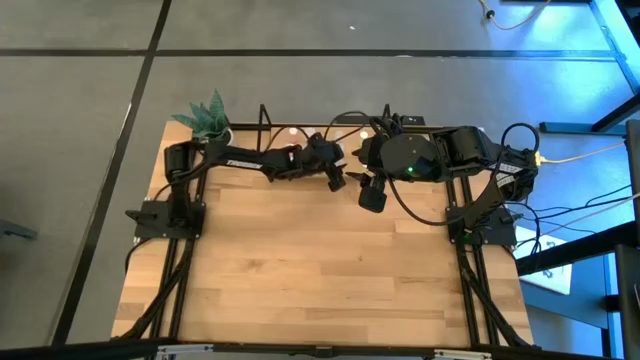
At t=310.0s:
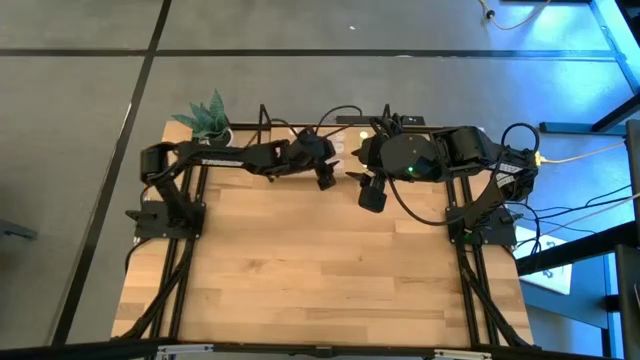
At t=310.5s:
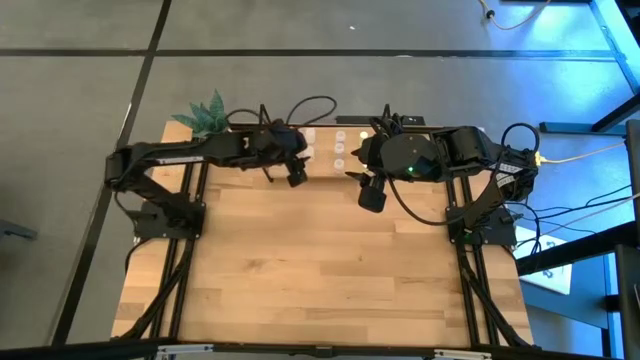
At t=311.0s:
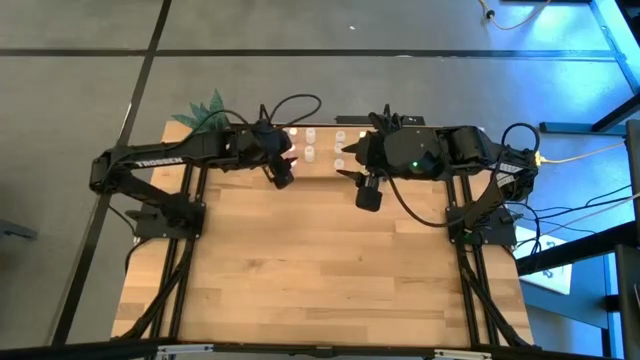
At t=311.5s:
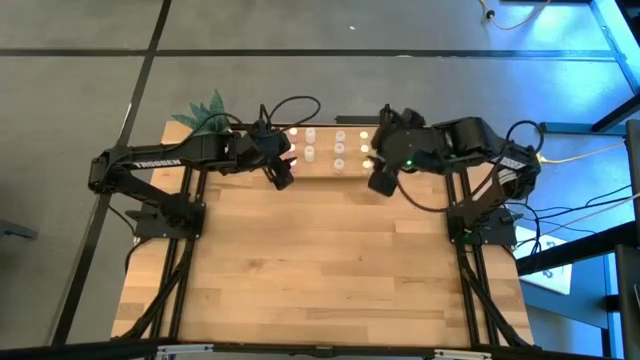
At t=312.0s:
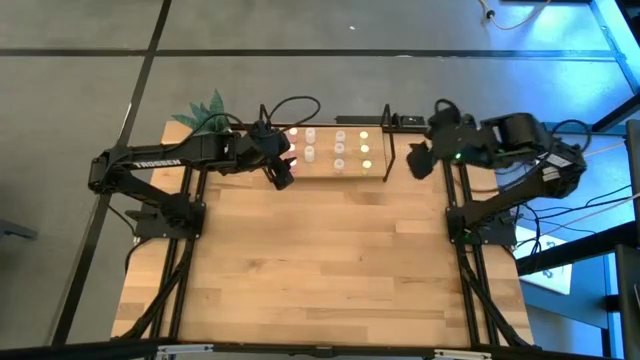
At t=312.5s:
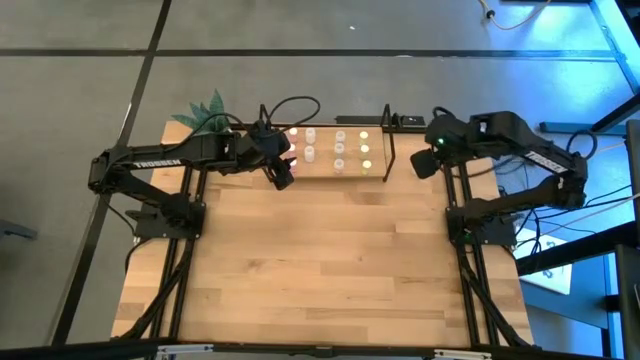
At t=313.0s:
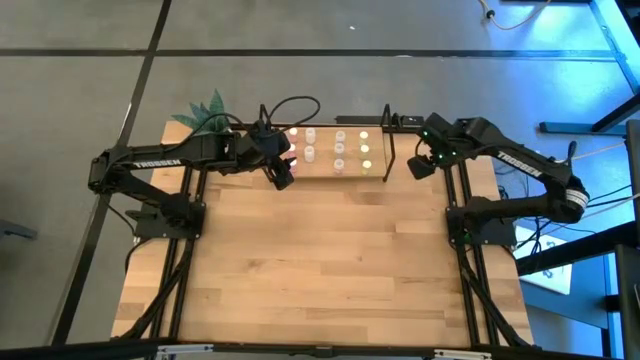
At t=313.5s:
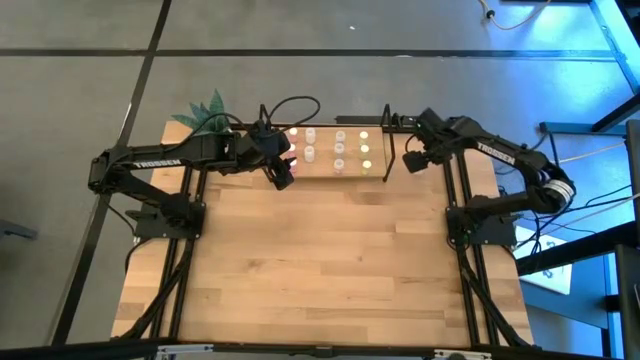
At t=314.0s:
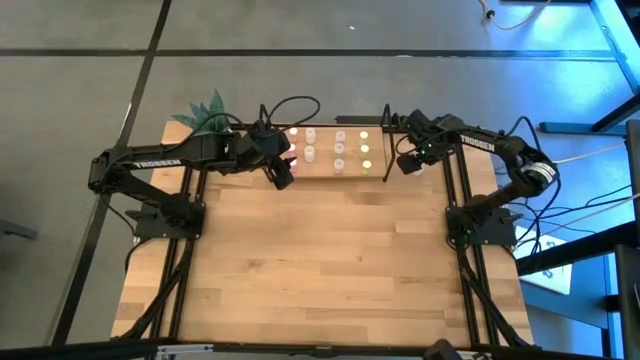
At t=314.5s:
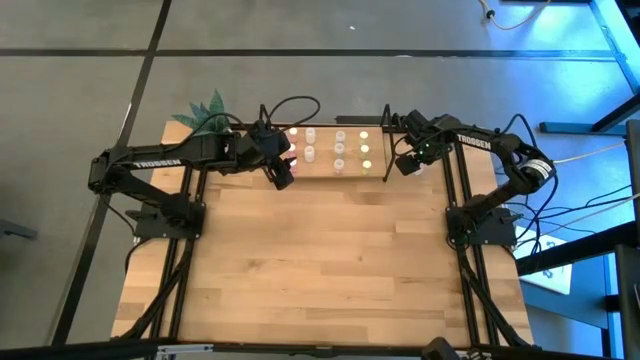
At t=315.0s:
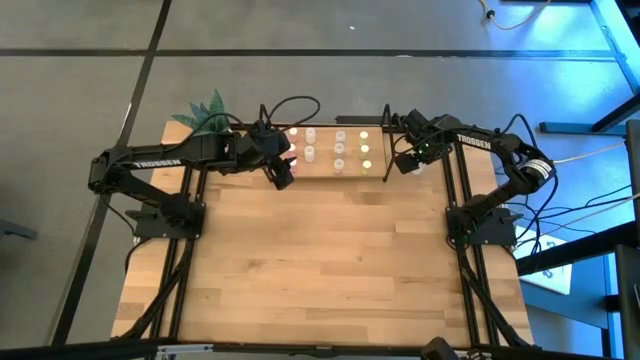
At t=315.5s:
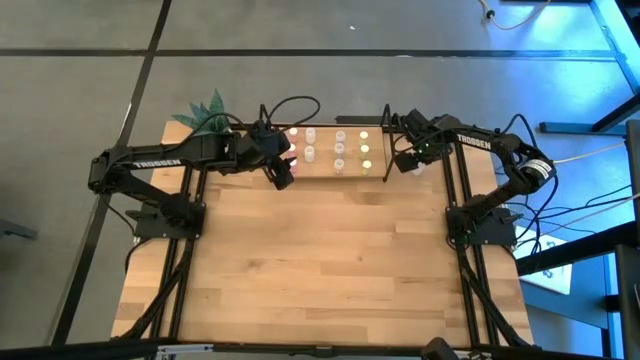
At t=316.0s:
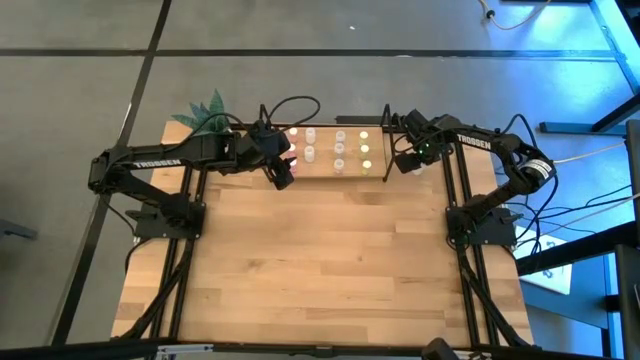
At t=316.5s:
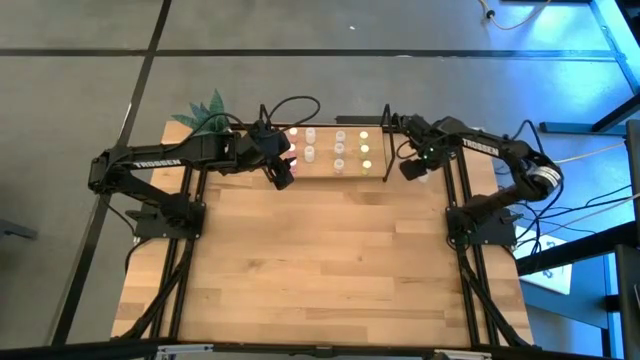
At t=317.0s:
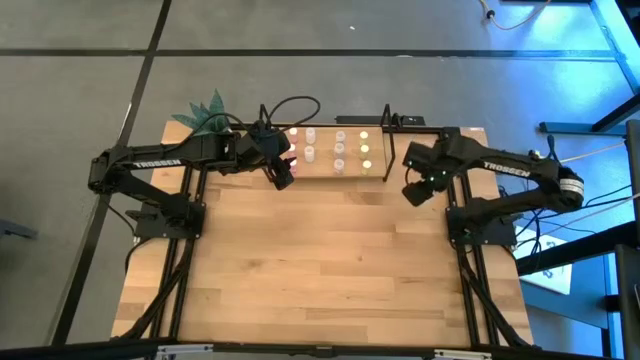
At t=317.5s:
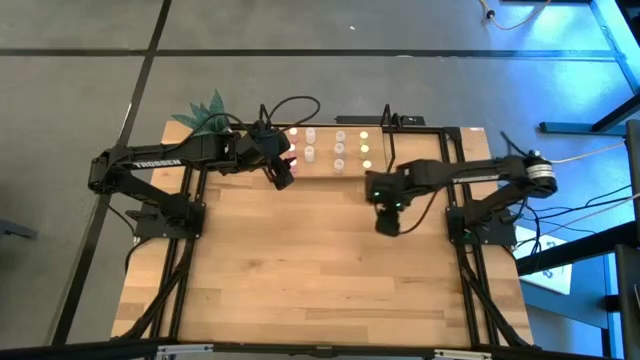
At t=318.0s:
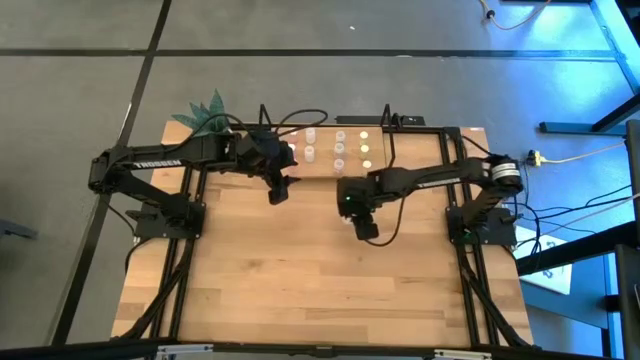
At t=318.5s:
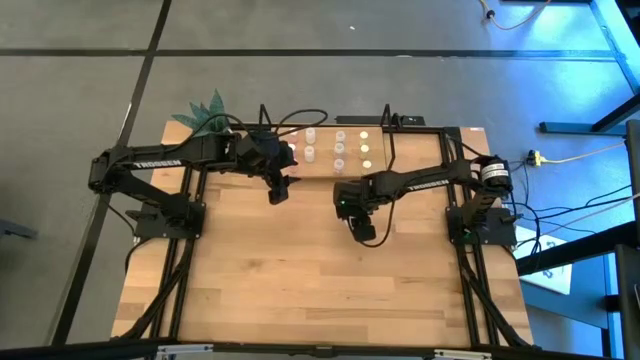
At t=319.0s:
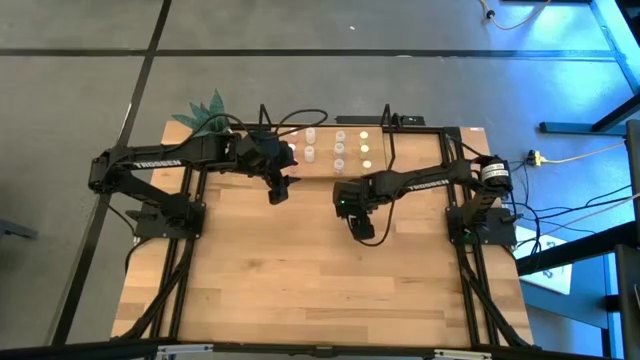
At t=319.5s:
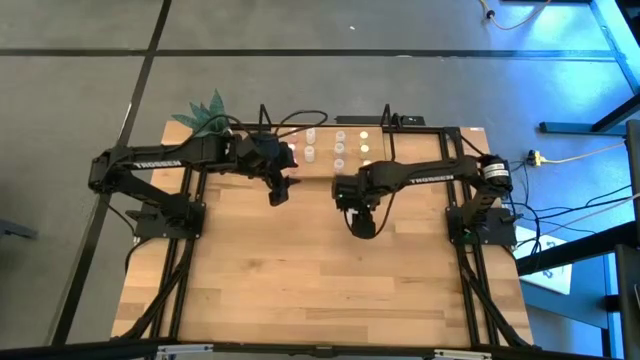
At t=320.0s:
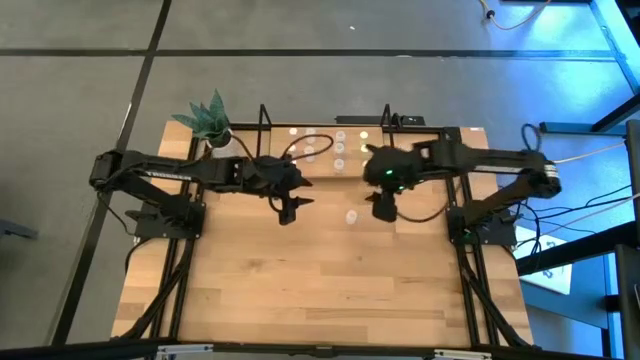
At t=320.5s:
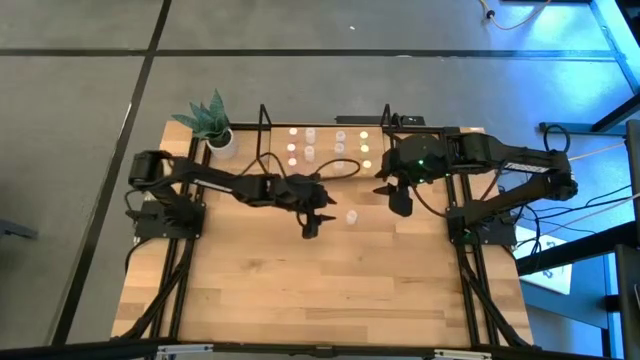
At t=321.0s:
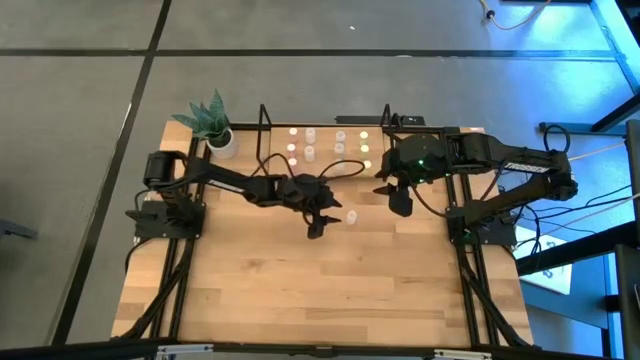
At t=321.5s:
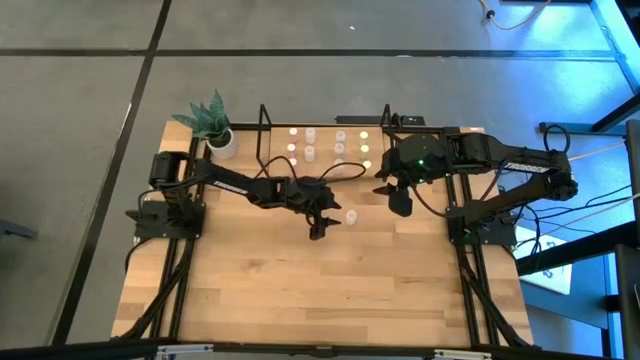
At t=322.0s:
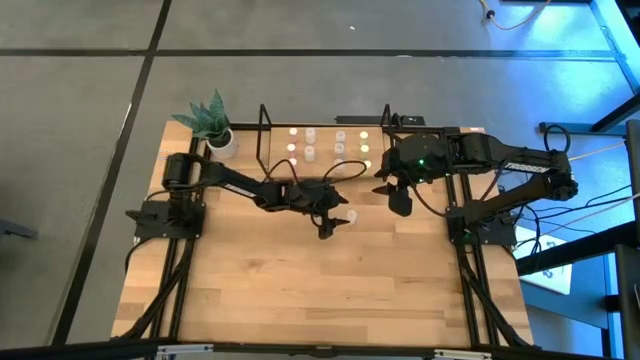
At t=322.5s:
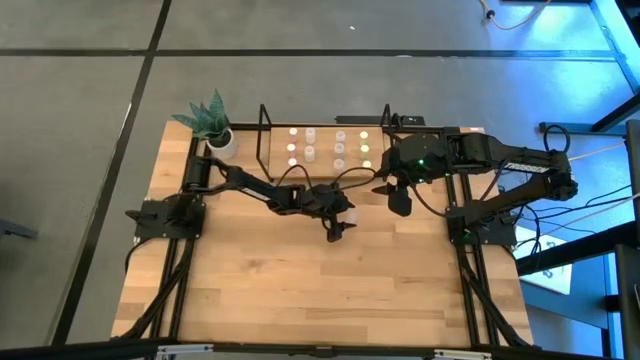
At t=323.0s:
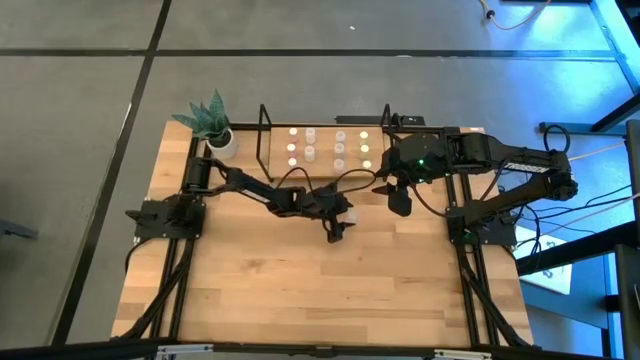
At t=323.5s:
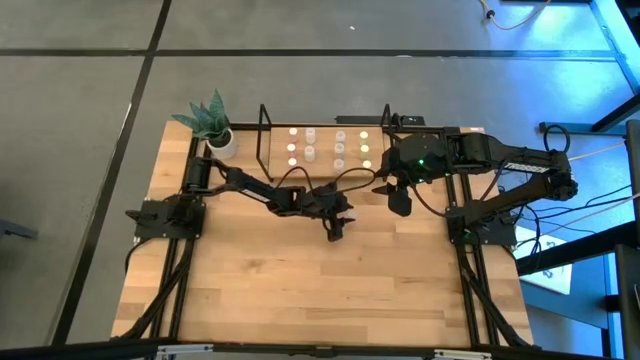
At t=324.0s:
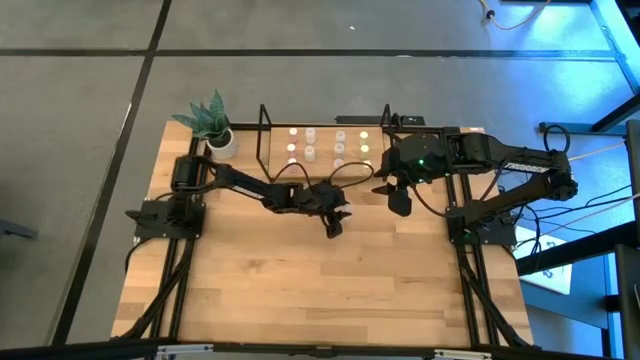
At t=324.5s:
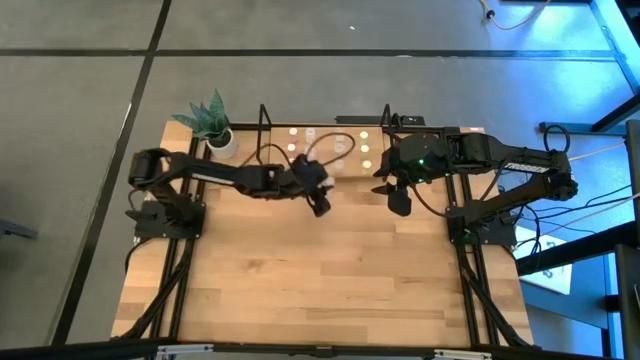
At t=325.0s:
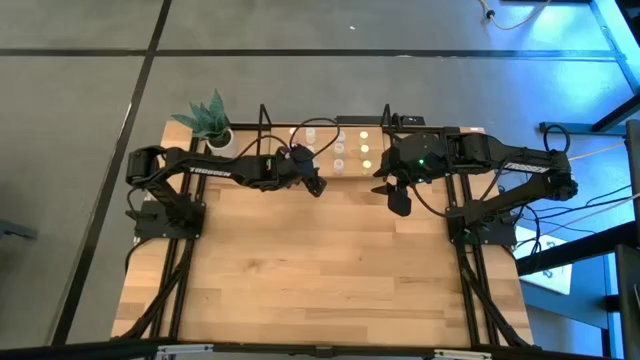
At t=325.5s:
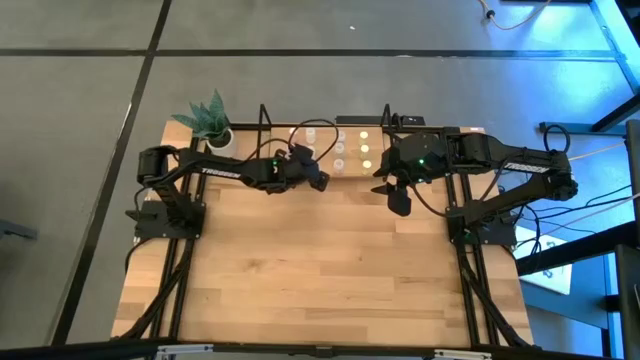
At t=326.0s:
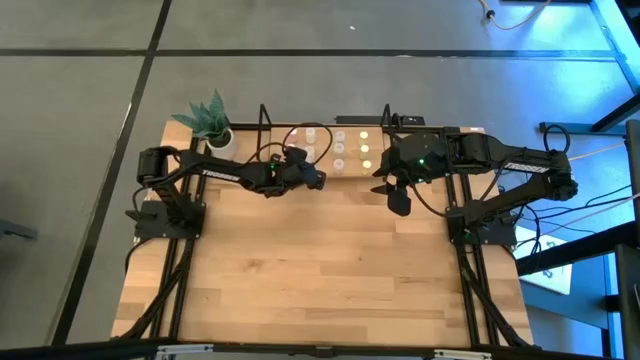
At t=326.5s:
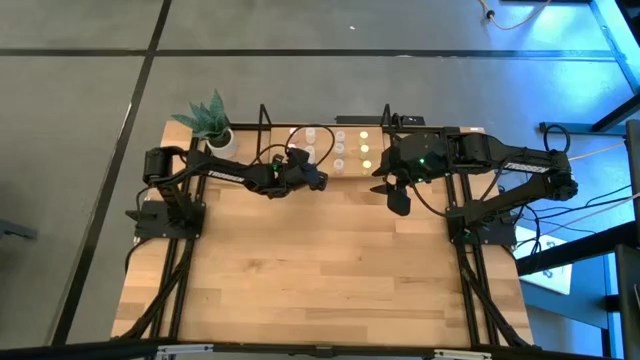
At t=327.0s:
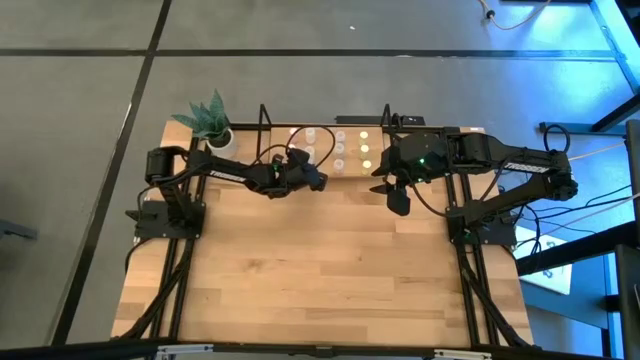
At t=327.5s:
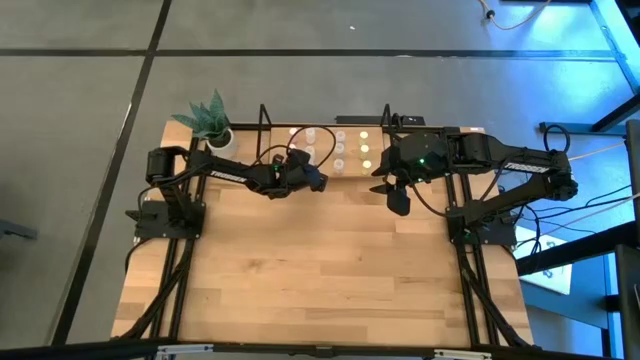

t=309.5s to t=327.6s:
Task: Pick and place medicine bottles onto shelf by color
Put the white pill bottle on the shelf aligned with the other white pill bottles

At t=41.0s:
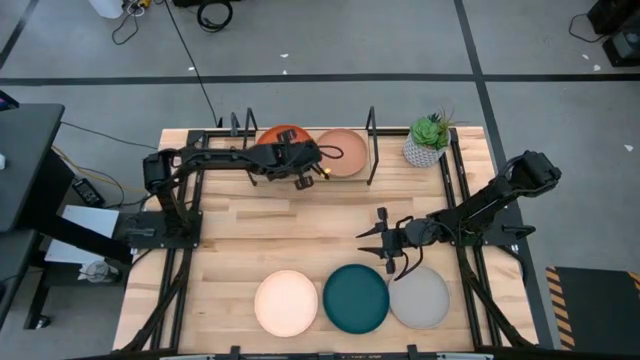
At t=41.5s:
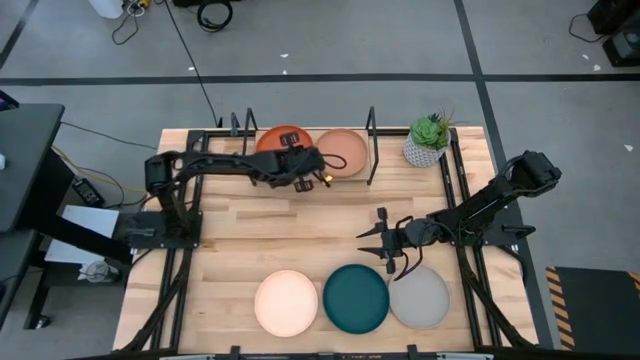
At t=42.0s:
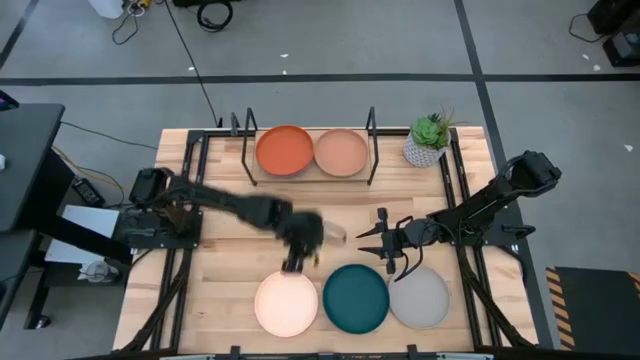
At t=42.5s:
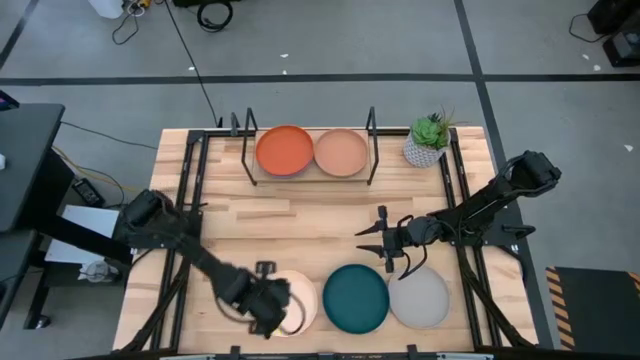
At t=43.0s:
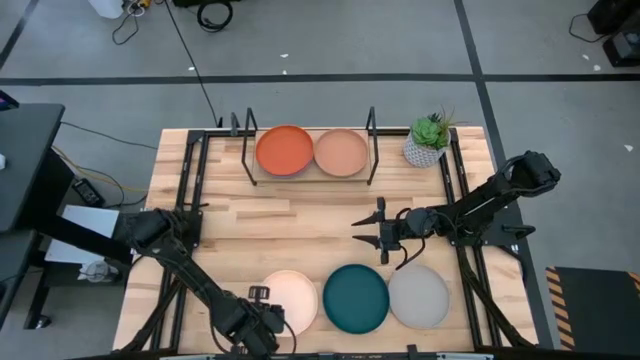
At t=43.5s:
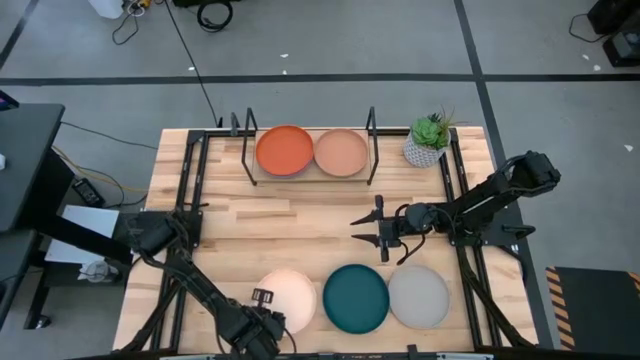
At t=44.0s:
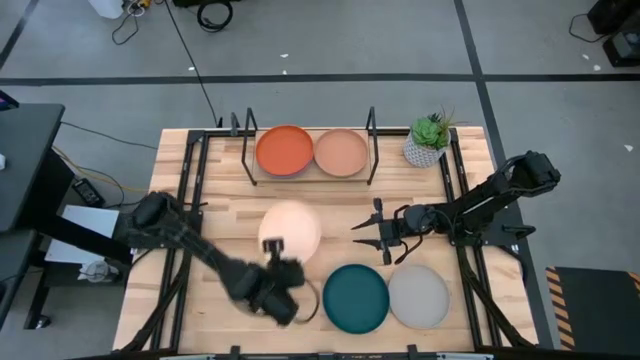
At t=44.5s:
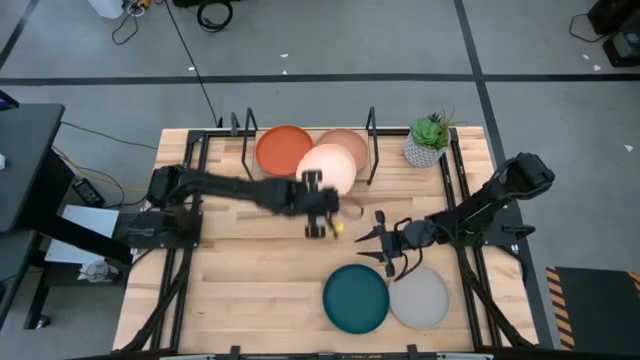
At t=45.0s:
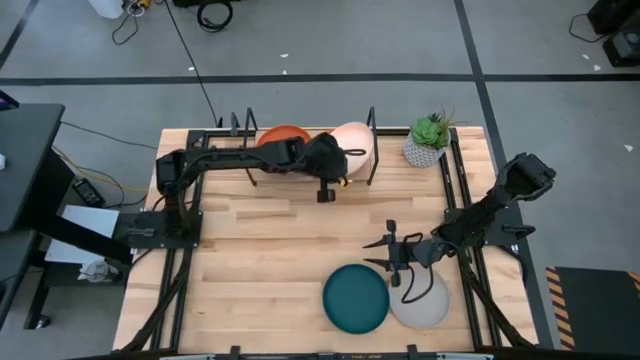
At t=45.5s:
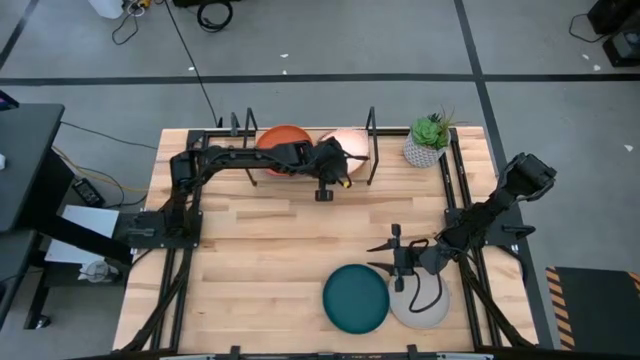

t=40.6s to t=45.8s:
Task: Place and stack plates onto a shelf
Stack the white plate on top of the brown plate on the shelf
